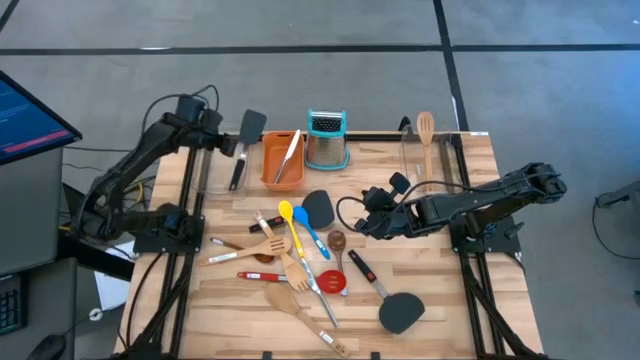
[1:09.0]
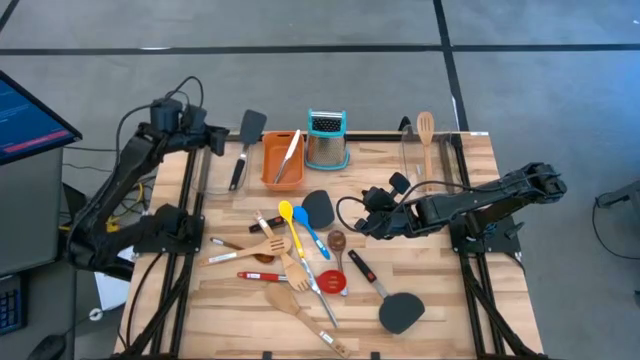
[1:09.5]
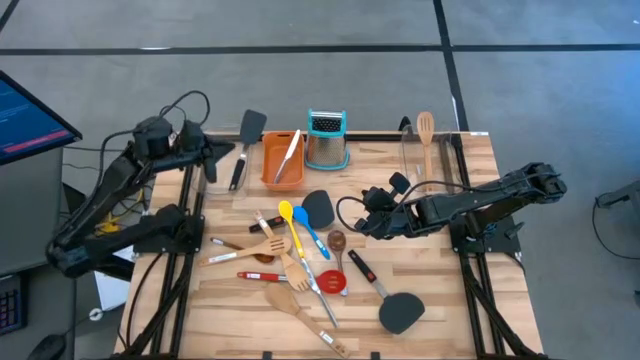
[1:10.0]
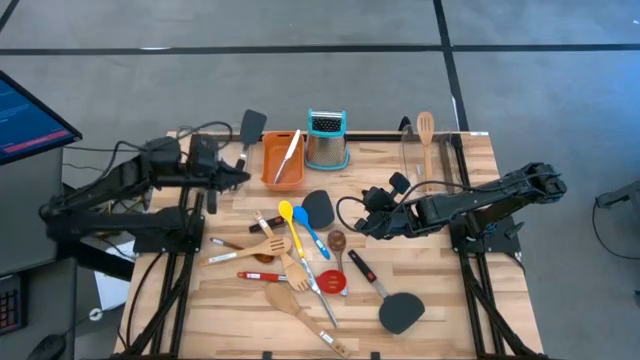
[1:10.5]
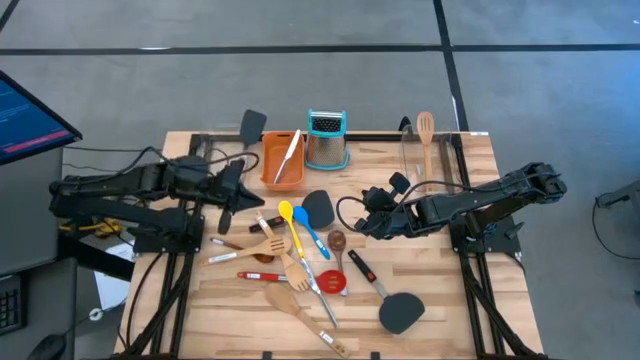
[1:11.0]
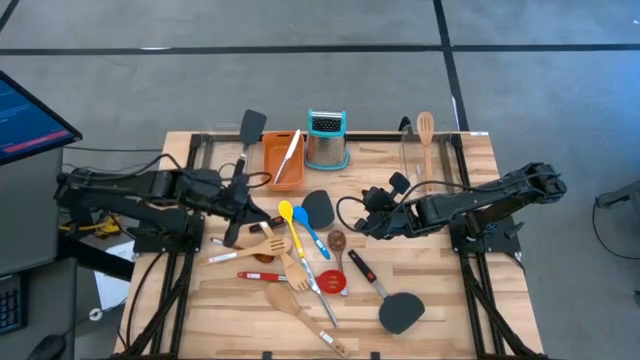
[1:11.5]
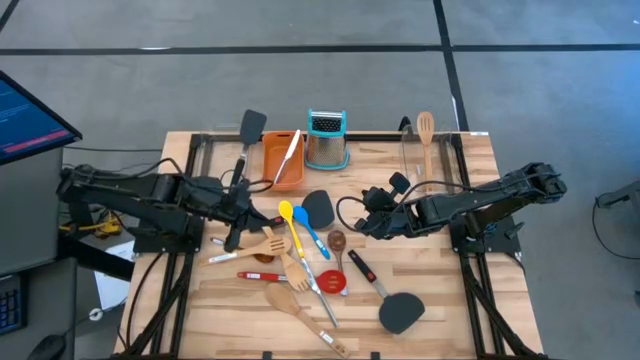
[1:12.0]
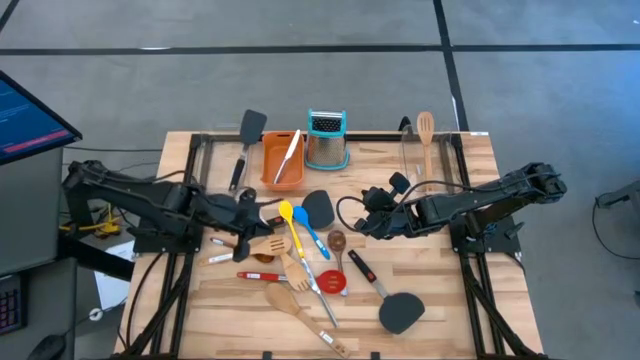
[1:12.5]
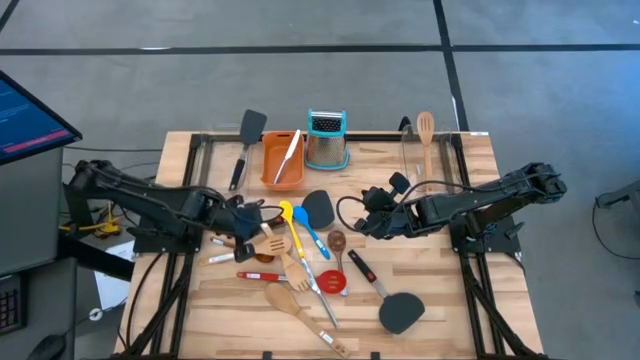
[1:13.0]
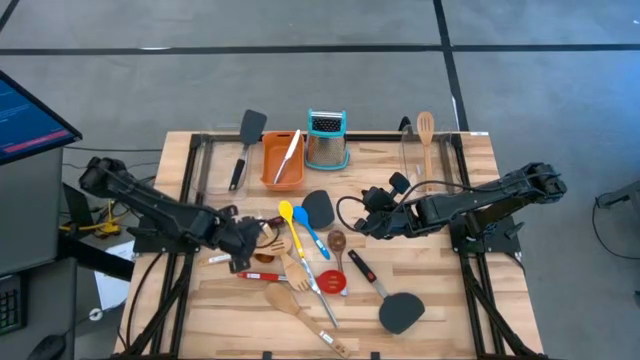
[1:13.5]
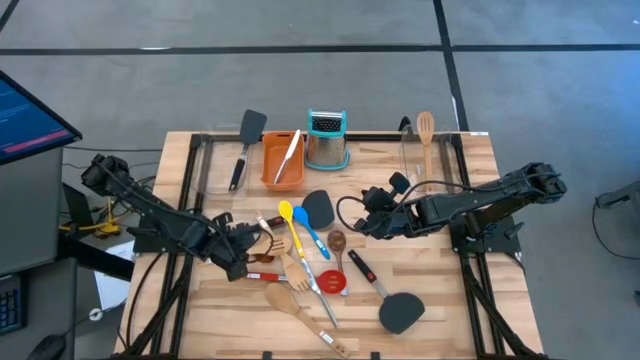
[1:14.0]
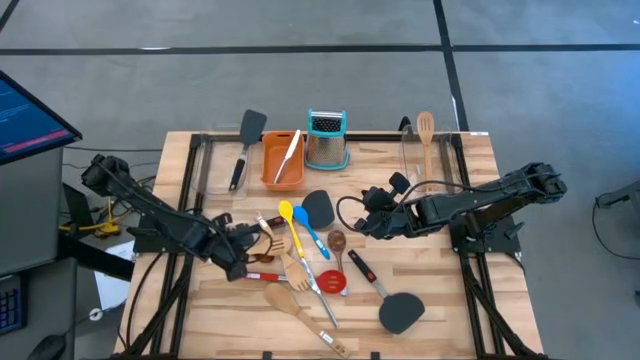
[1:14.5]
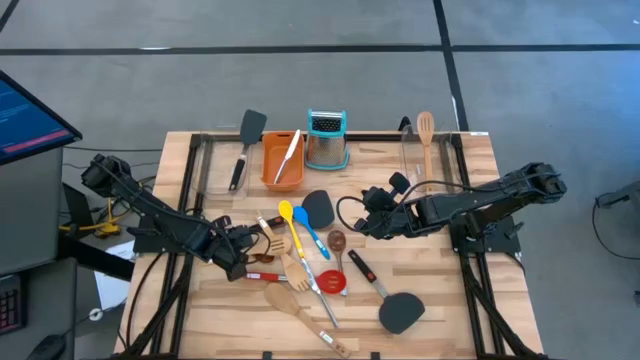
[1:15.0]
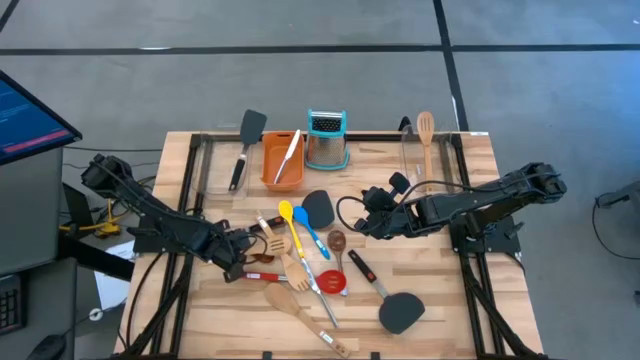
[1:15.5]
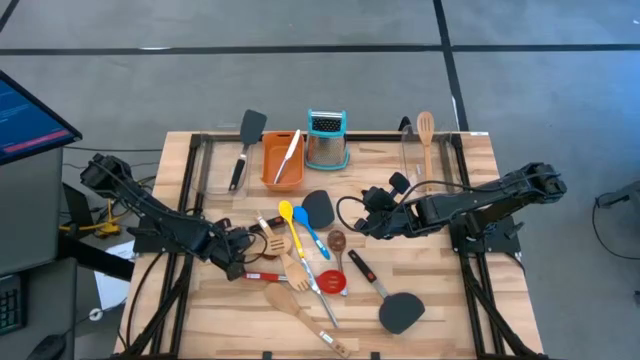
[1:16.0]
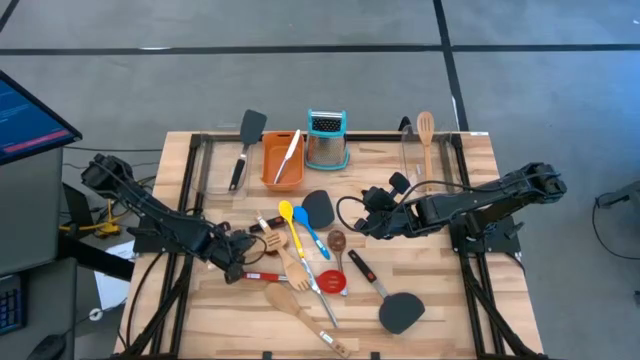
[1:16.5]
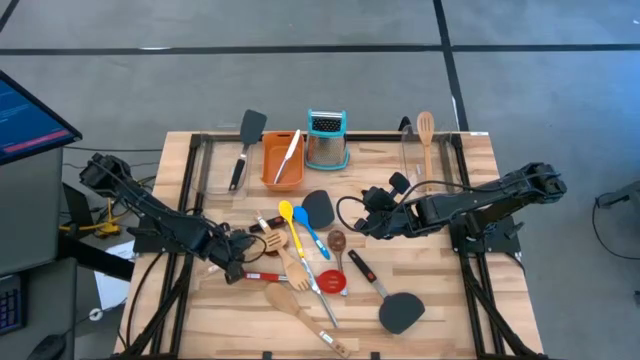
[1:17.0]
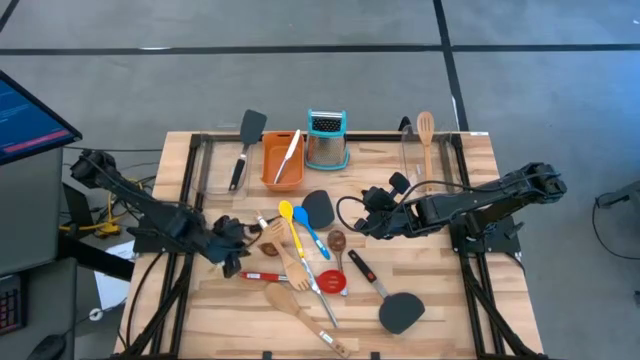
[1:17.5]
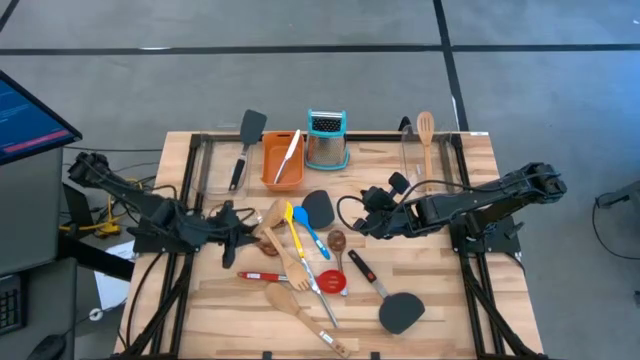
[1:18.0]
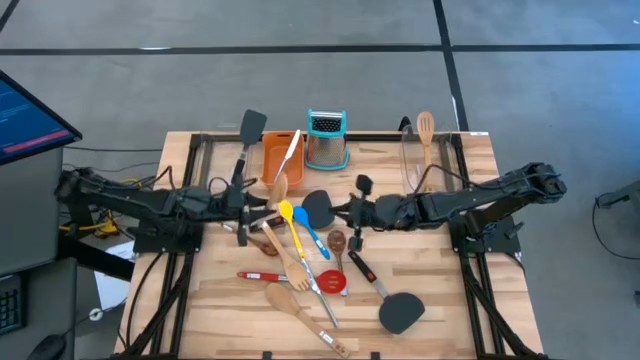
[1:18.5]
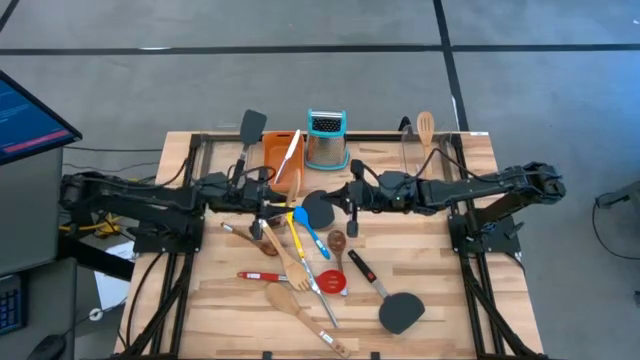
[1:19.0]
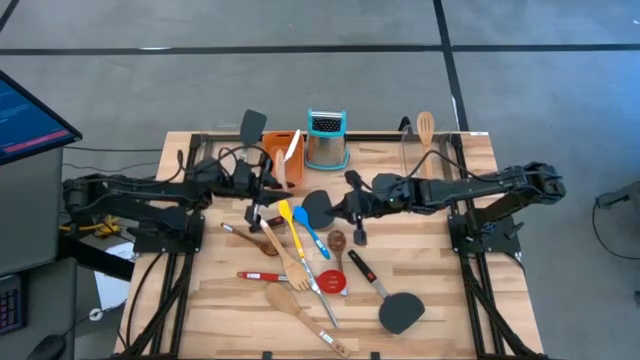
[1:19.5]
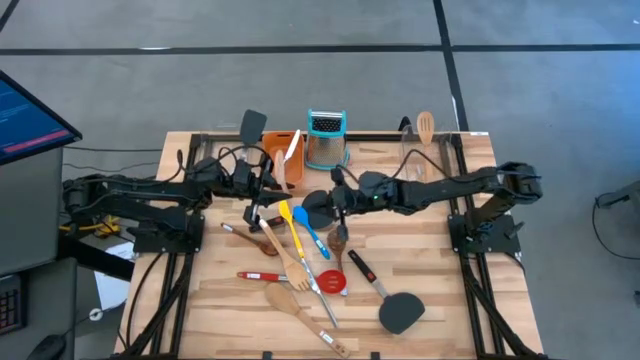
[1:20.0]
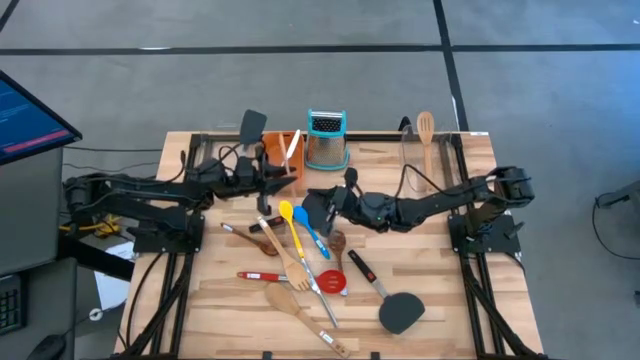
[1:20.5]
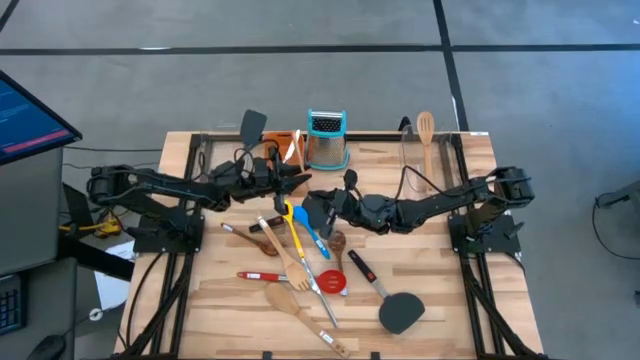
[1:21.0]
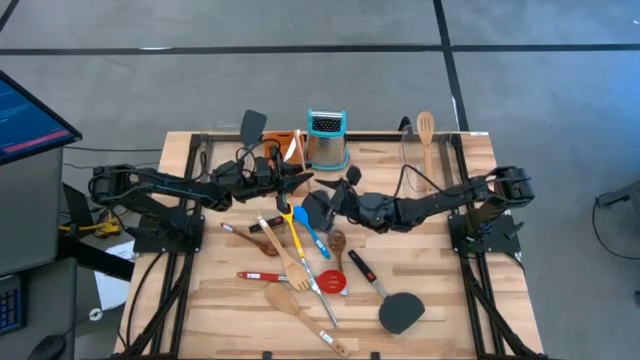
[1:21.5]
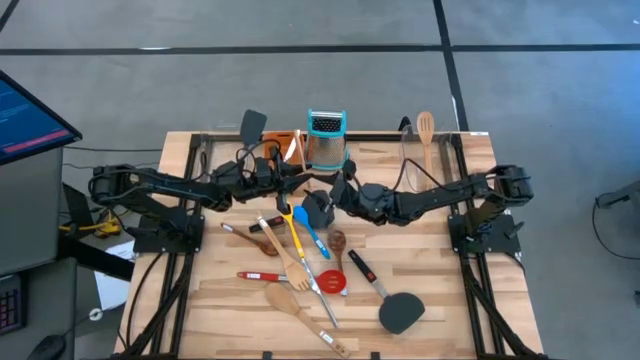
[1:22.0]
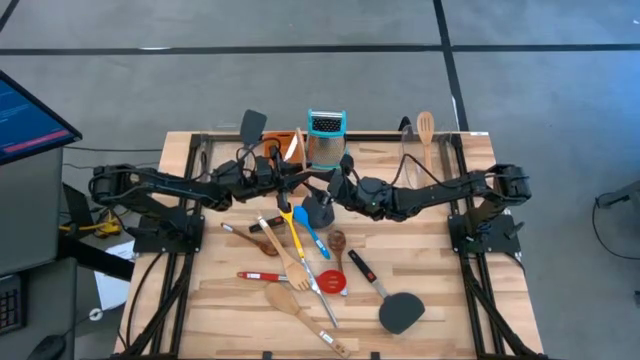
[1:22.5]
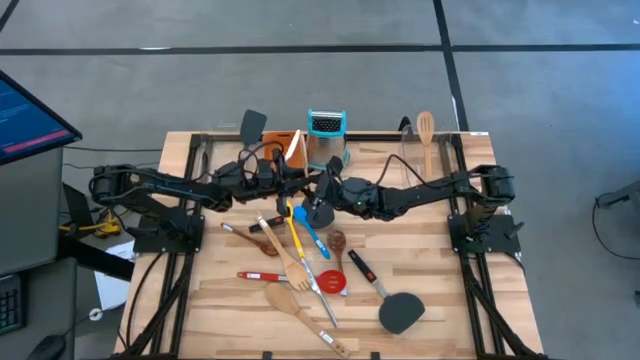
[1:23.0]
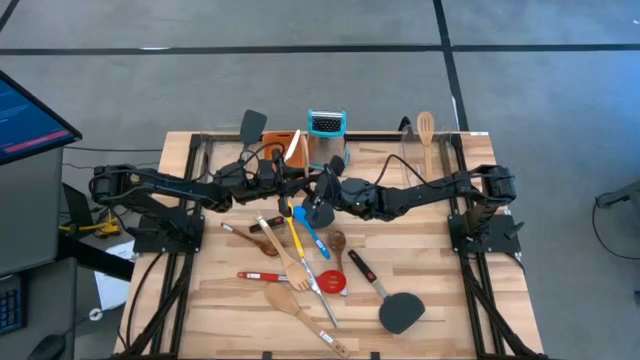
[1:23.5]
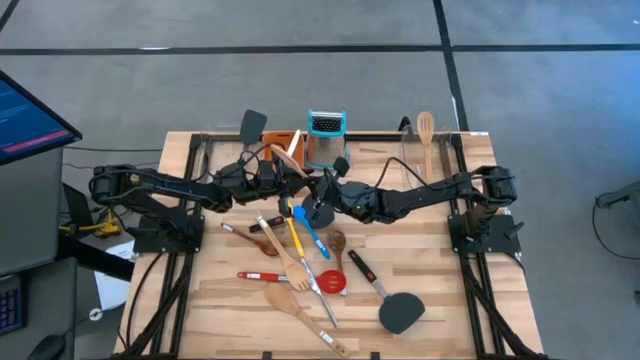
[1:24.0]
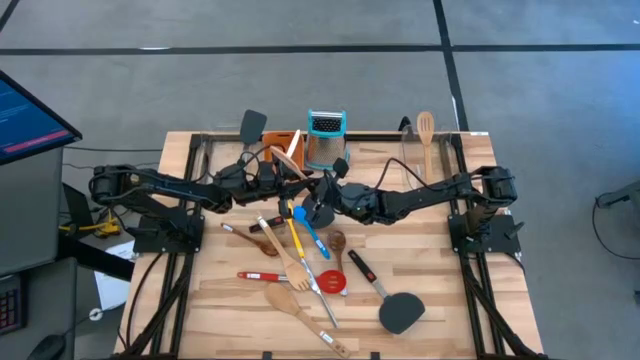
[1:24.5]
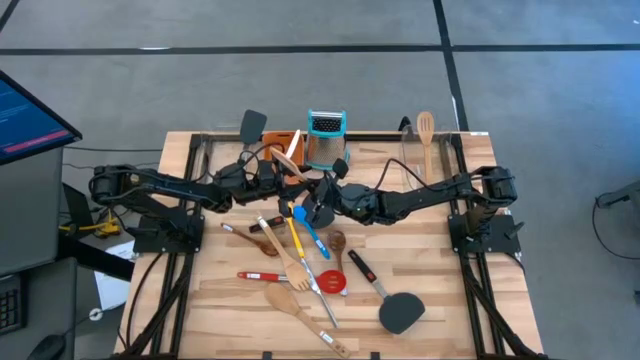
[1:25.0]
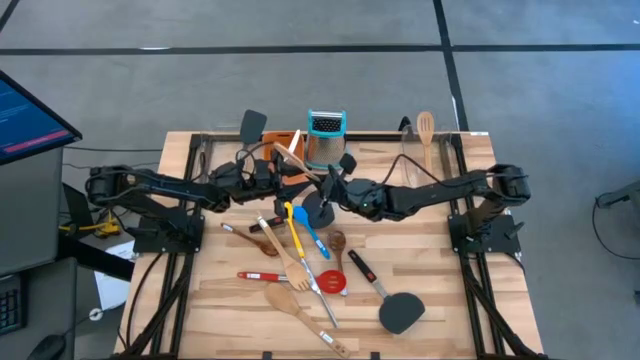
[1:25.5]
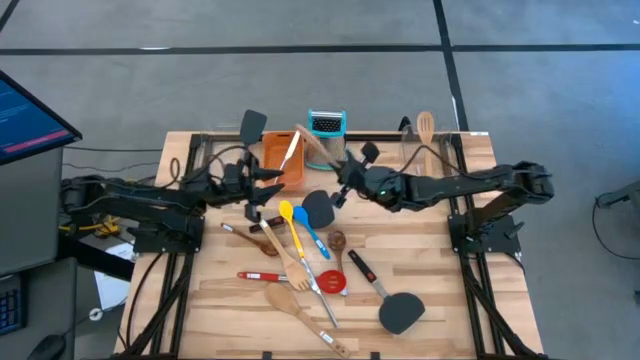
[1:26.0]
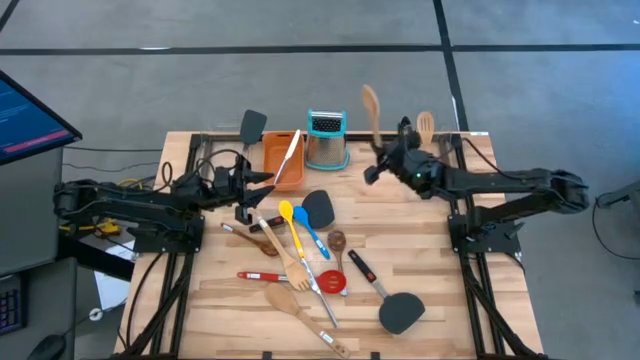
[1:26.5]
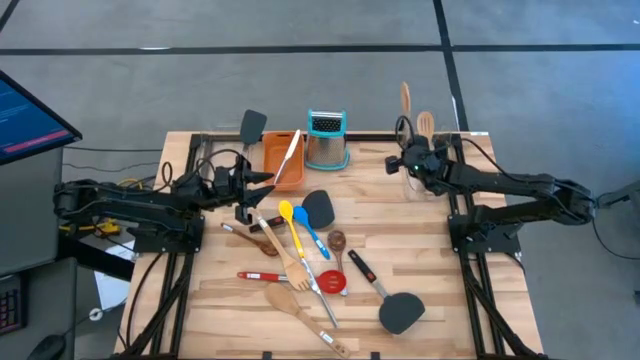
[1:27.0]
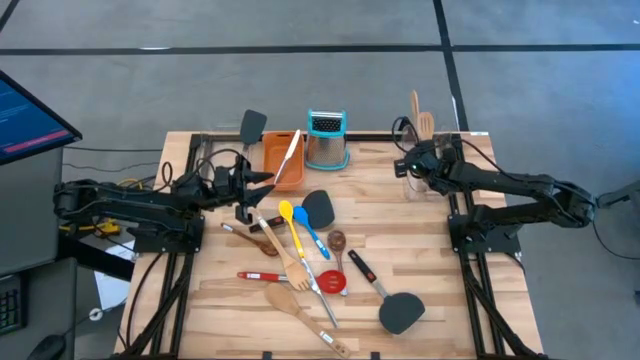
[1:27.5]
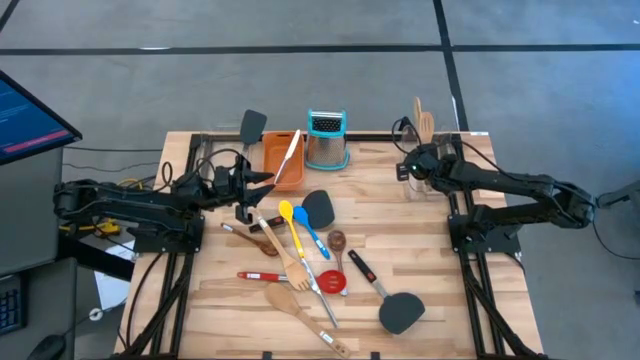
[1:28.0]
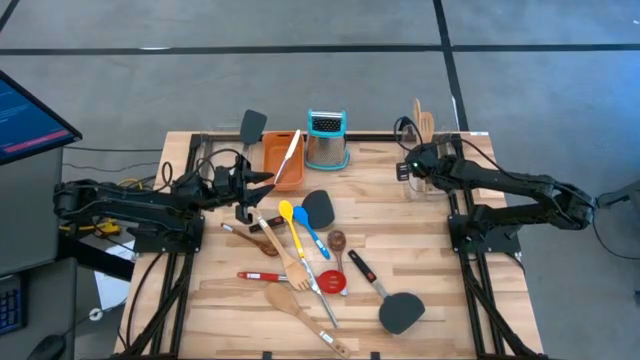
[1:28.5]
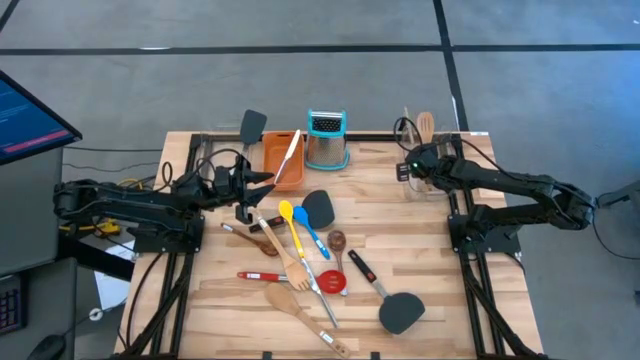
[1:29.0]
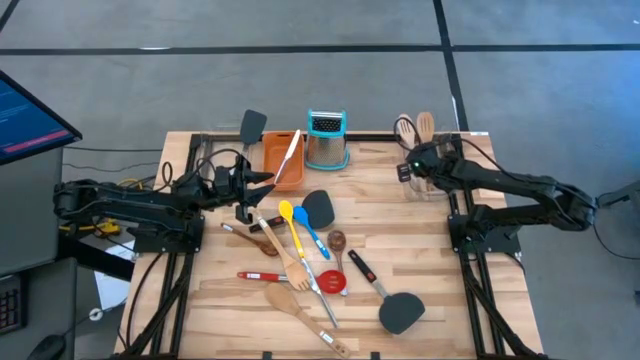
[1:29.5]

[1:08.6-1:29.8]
Task: Pick & Place Kitchen Items
Put the brown wooden spoon into the right transparent bin
